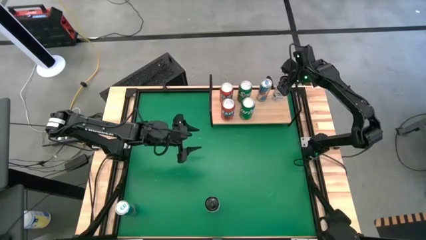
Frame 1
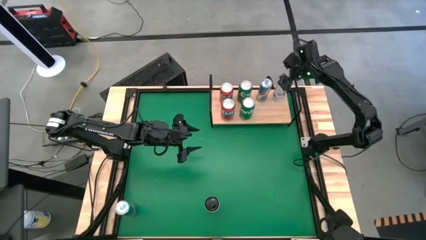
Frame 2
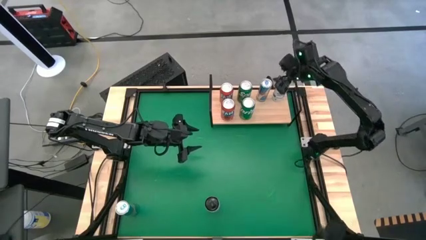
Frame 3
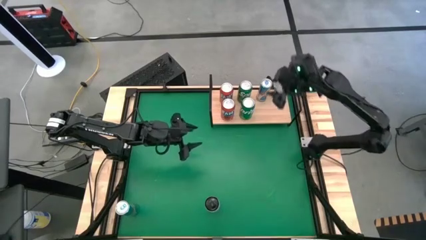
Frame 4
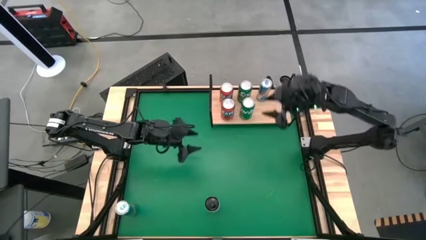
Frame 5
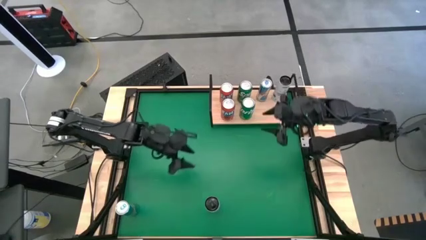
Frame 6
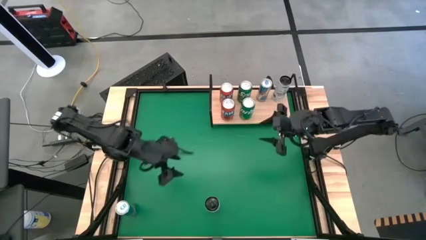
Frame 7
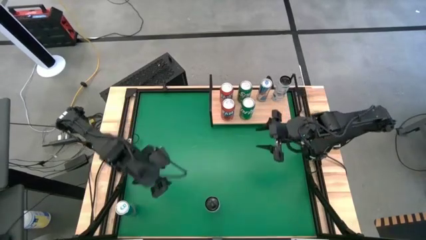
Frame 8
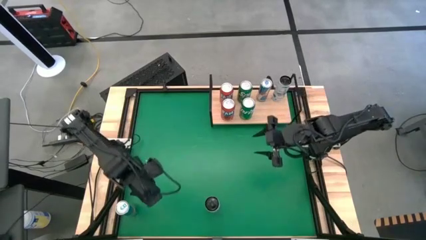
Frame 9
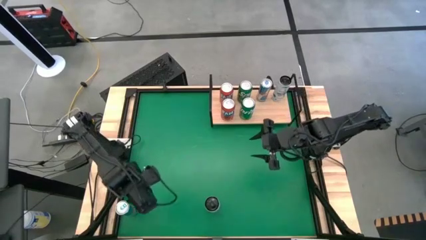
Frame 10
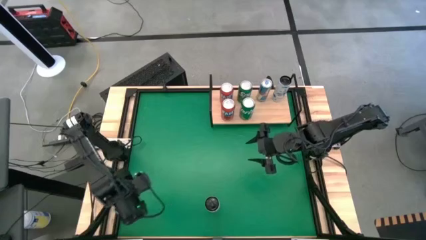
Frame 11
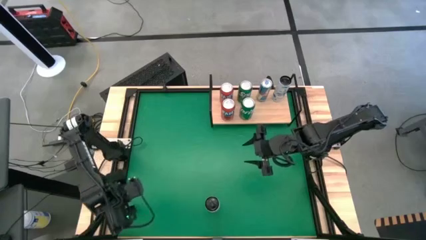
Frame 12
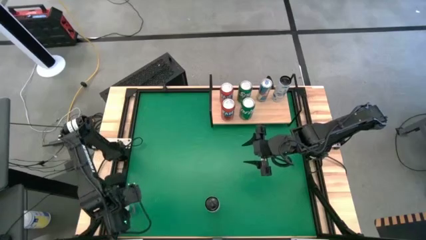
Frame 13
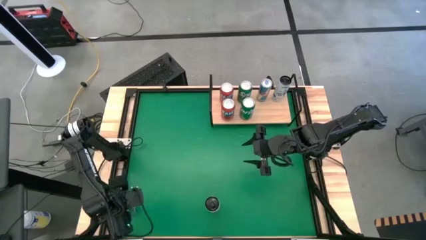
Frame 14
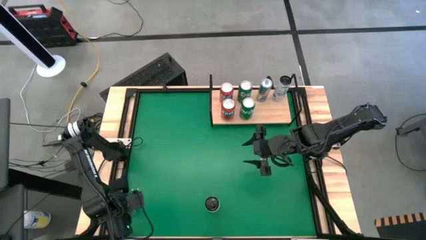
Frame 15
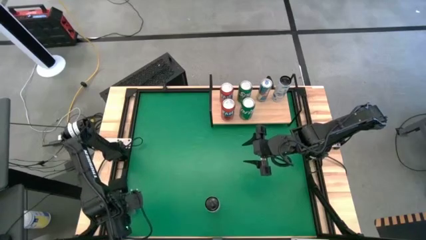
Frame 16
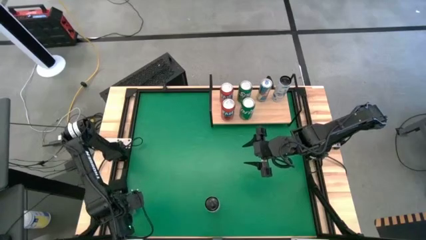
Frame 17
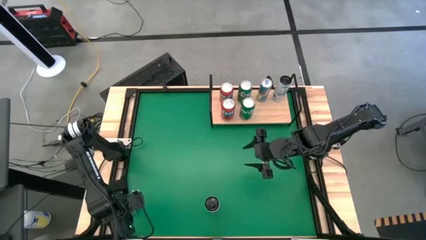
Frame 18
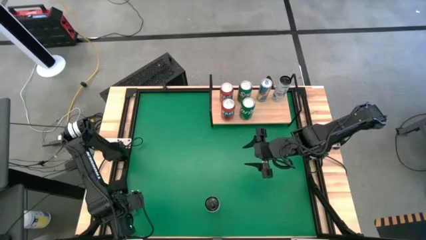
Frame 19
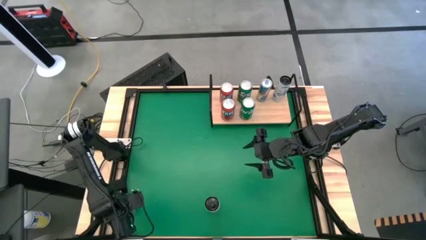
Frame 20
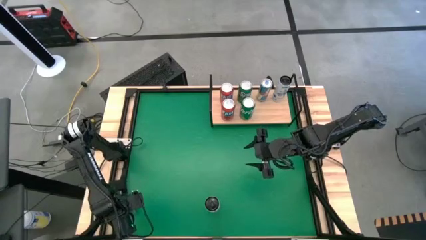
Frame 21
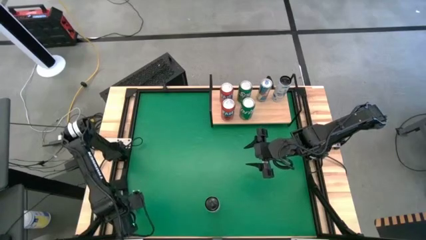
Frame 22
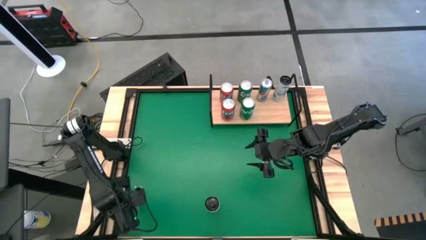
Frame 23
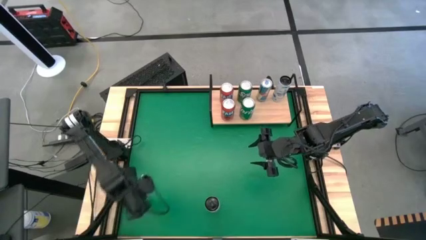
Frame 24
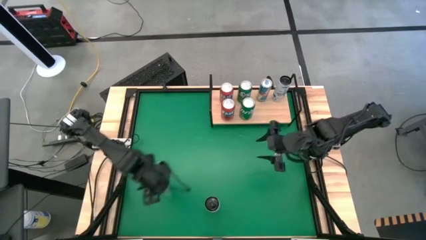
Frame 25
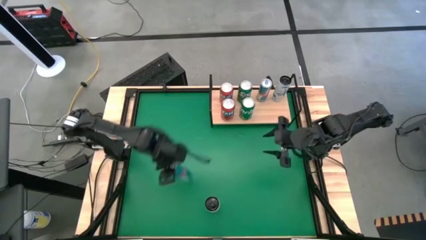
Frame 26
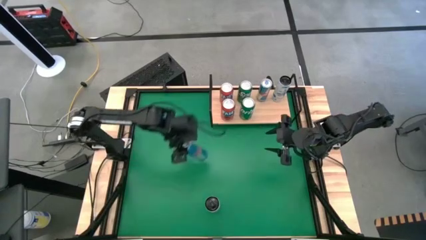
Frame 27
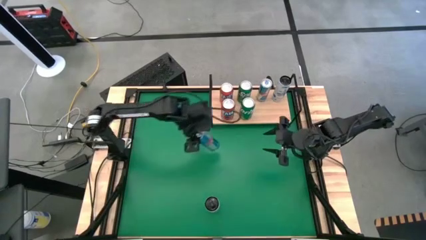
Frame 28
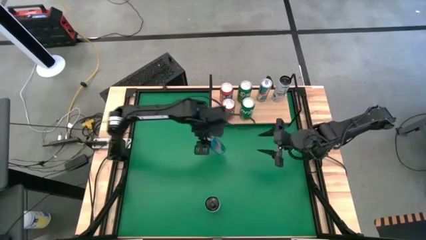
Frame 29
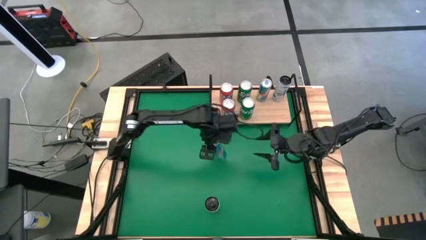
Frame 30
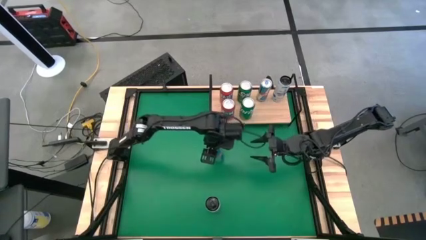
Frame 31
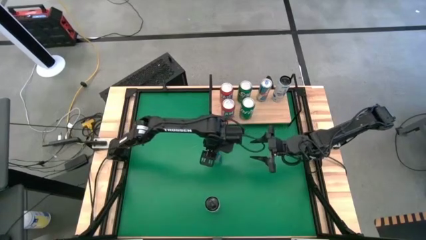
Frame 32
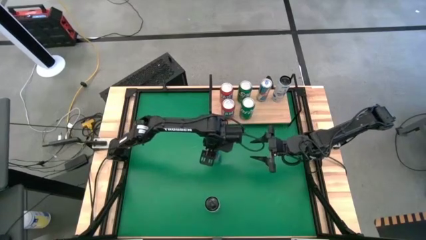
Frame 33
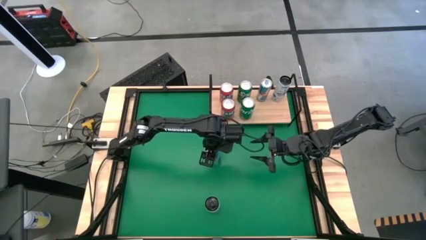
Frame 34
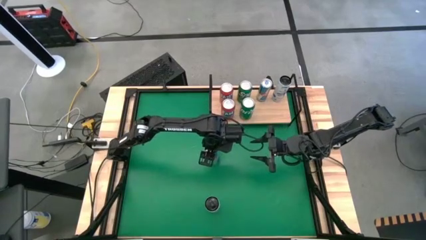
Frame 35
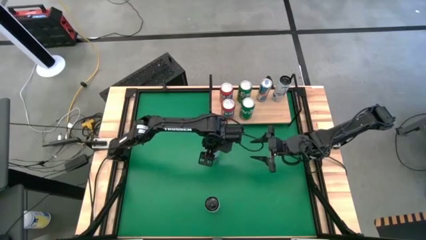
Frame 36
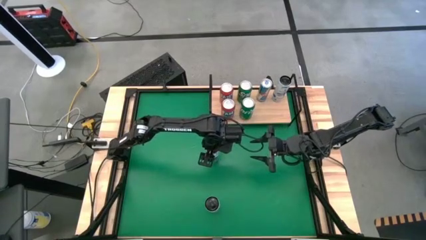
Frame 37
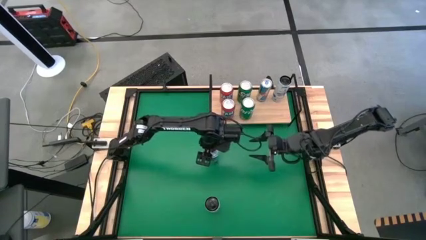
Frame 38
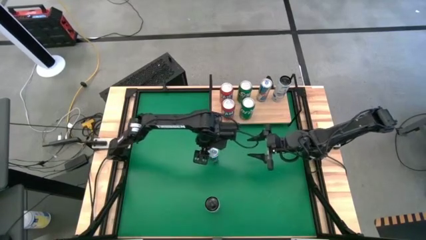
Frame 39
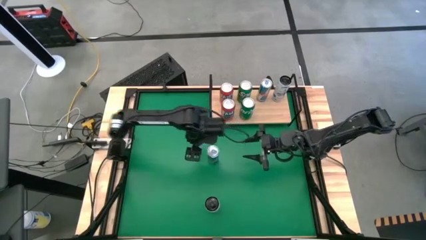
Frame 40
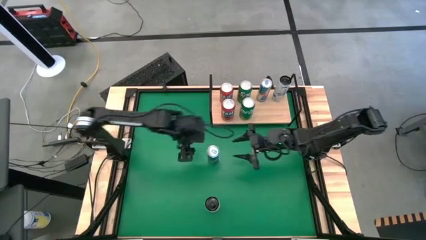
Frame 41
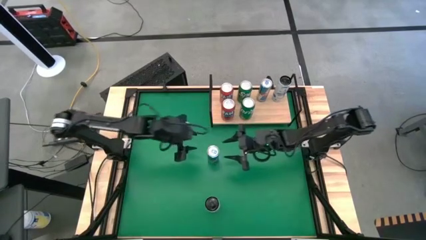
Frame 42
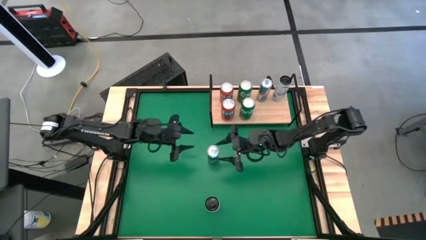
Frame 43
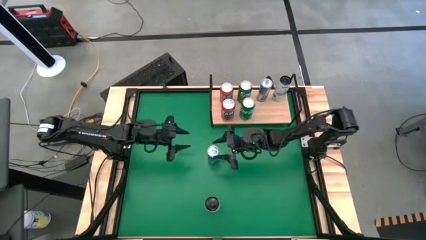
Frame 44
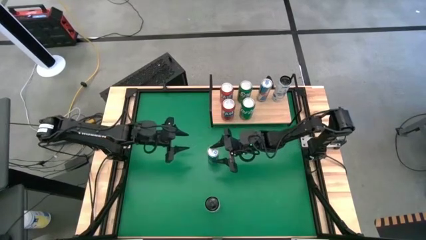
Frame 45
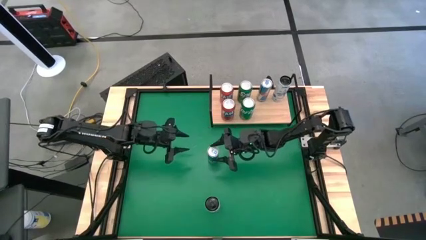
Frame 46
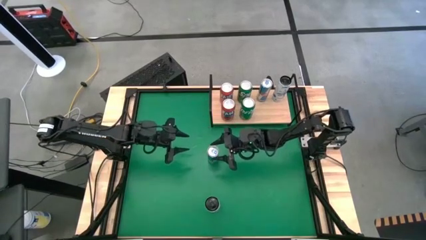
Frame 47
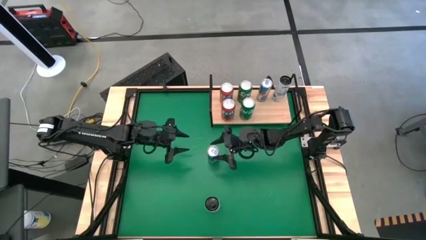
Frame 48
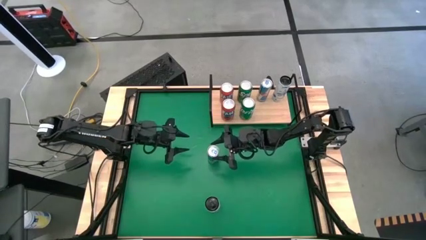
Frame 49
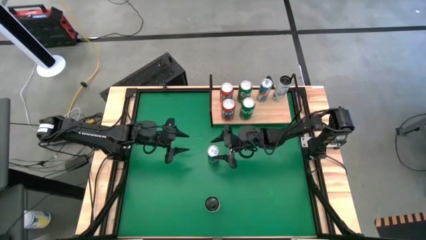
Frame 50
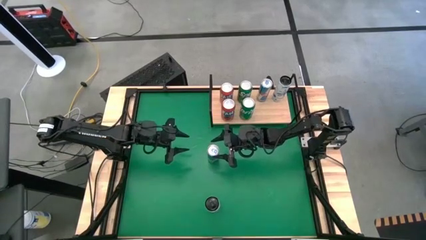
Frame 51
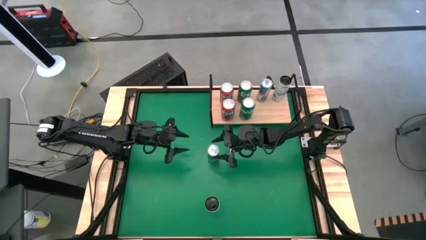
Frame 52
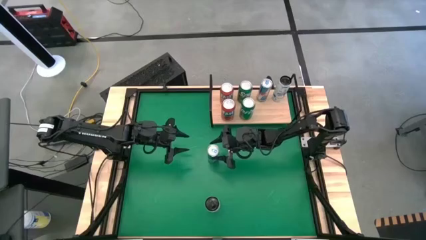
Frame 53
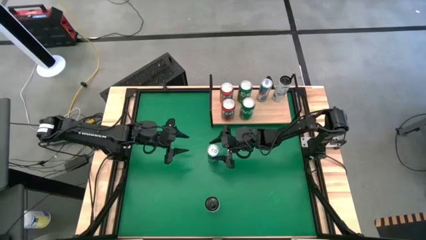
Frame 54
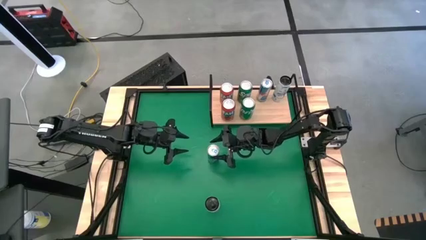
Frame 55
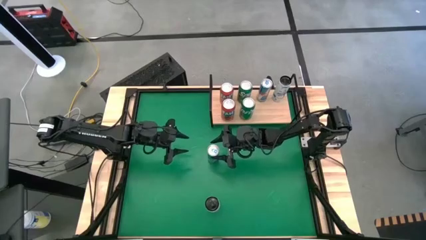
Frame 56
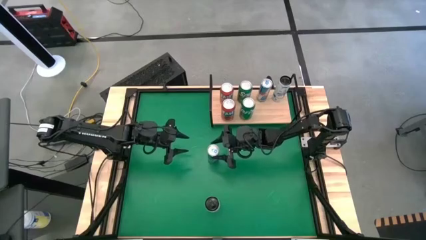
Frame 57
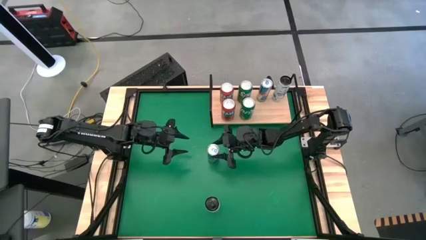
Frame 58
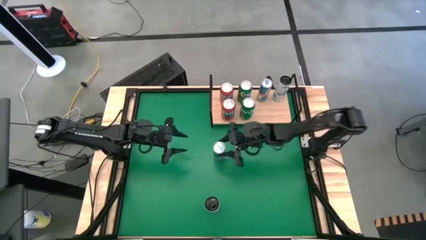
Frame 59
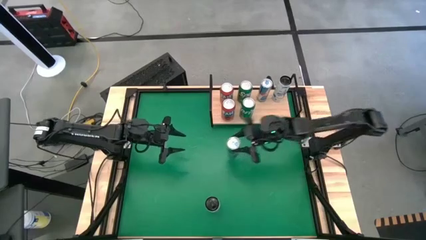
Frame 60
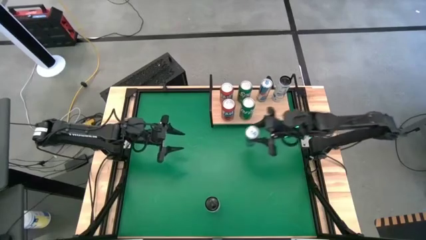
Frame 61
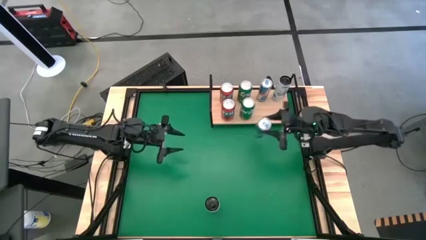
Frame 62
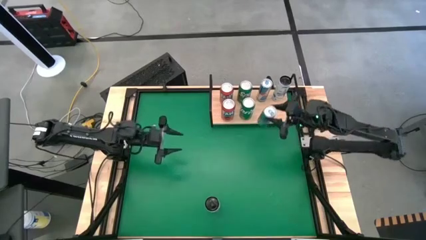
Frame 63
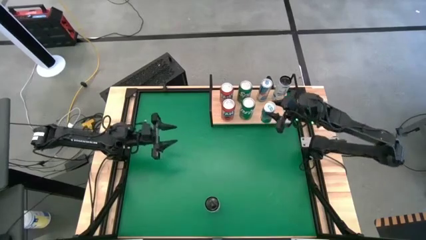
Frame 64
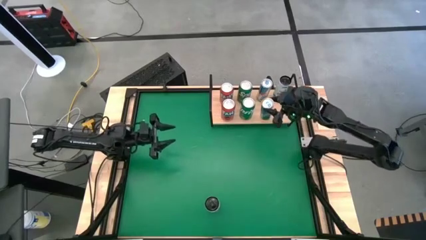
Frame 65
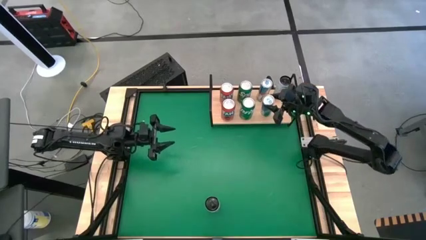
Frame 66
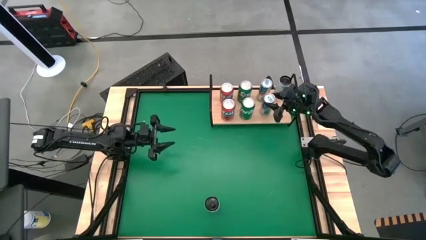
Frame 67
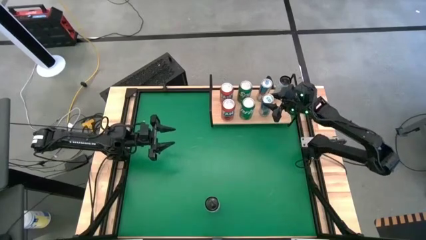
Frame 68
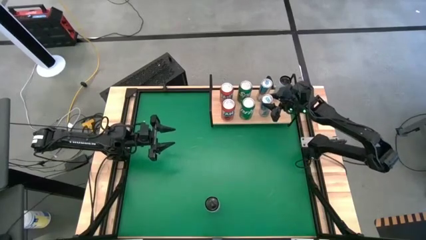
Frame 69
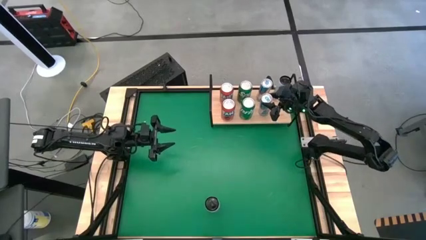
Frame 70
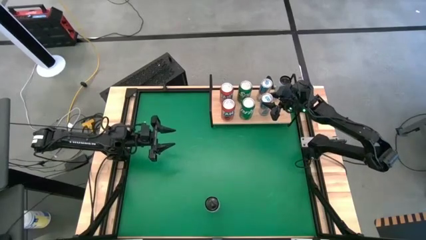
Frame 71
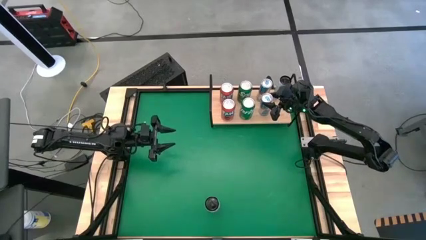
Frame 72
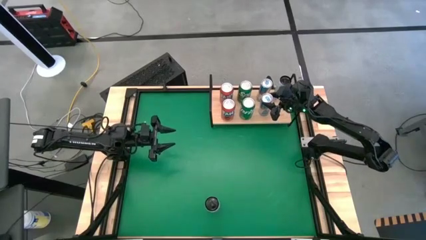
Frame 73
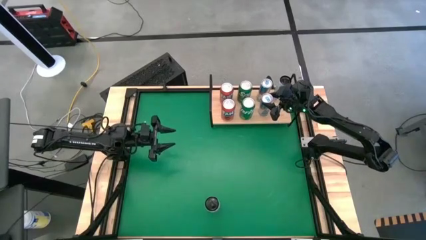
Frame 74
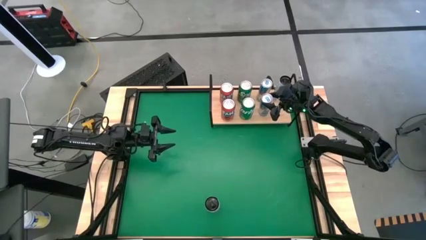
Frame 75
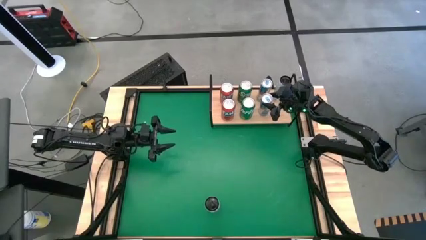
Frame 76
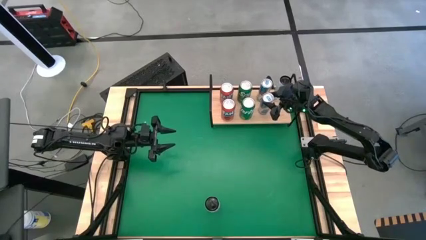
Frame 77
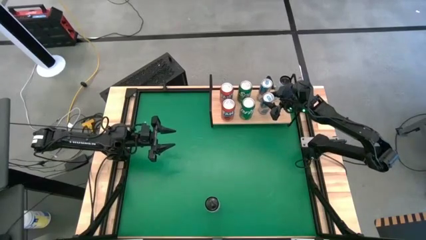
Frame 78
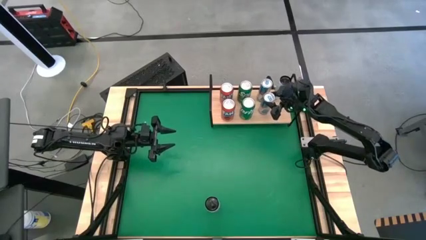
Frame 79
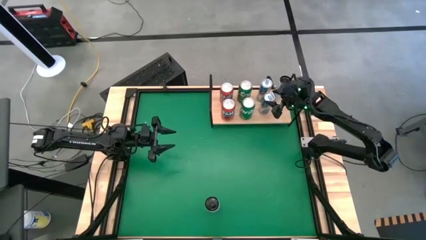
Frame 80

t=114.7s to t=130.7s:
Task: Place canned beverage on shelf
Put the blue soda can on the shelf aligned with the other blue soda can
